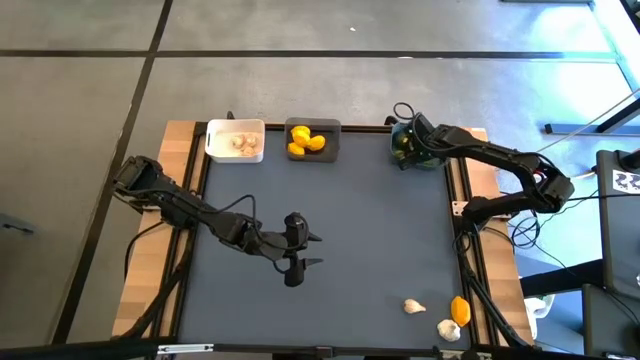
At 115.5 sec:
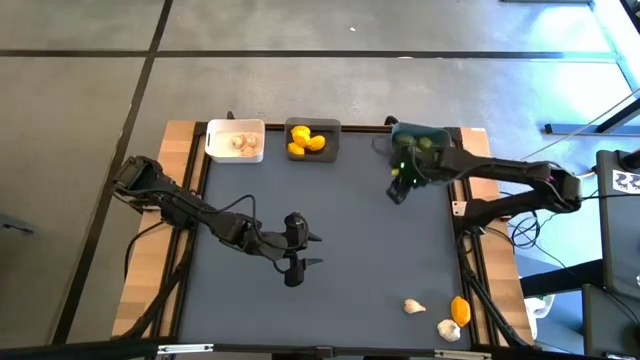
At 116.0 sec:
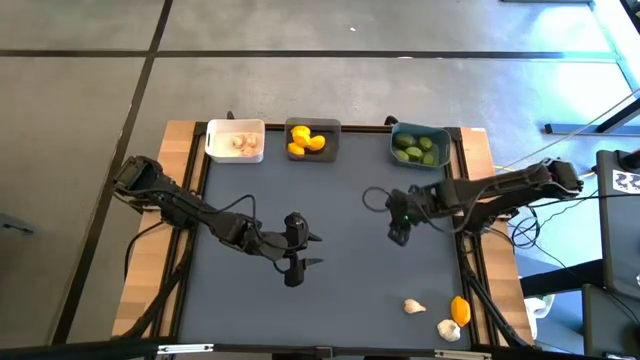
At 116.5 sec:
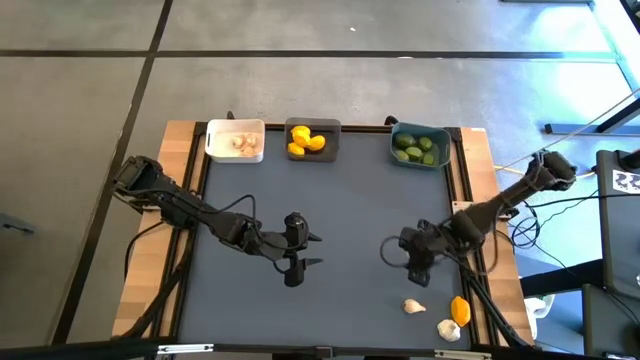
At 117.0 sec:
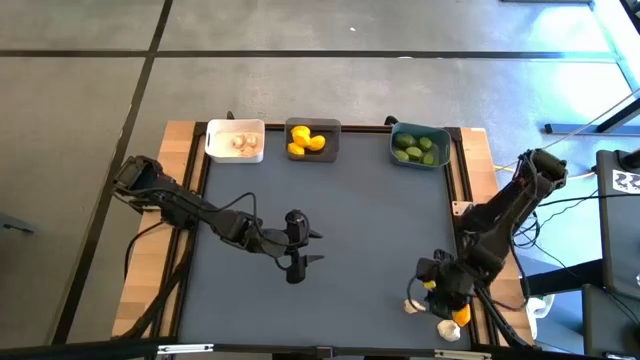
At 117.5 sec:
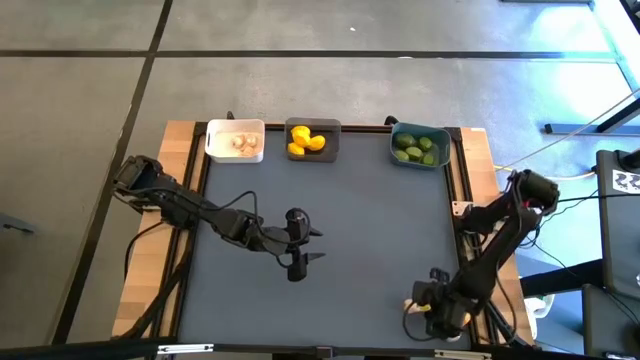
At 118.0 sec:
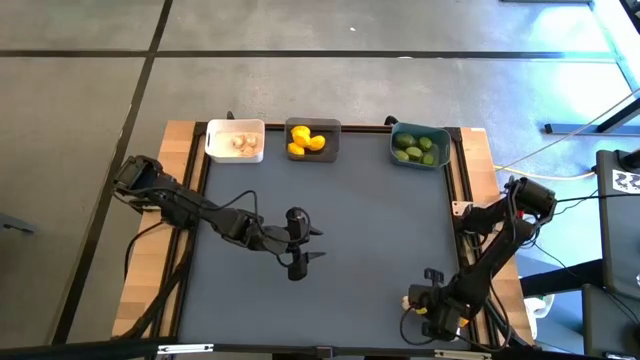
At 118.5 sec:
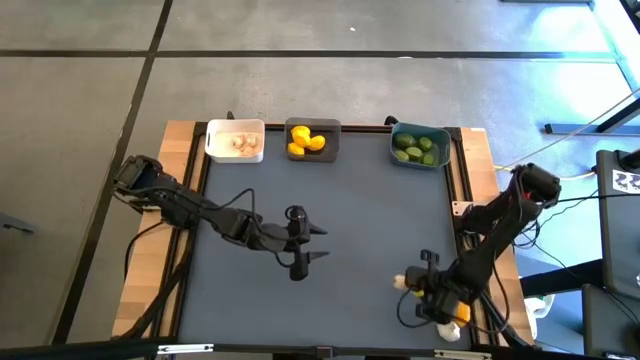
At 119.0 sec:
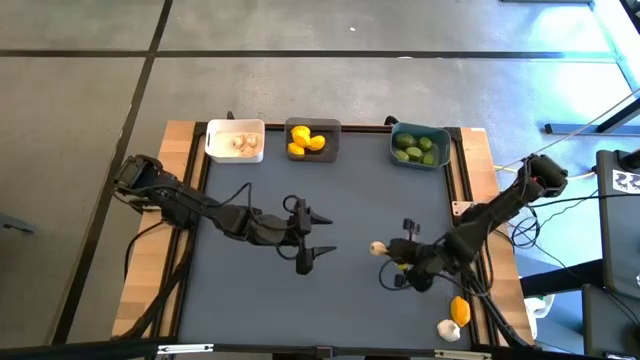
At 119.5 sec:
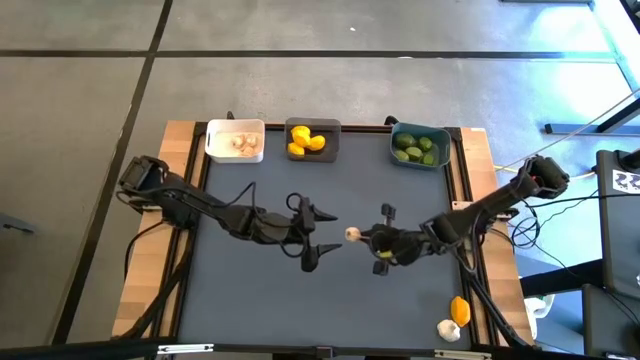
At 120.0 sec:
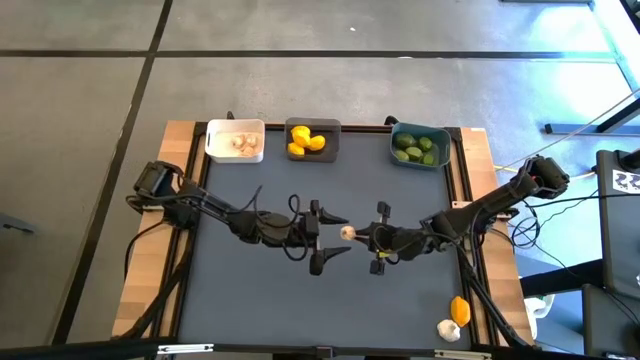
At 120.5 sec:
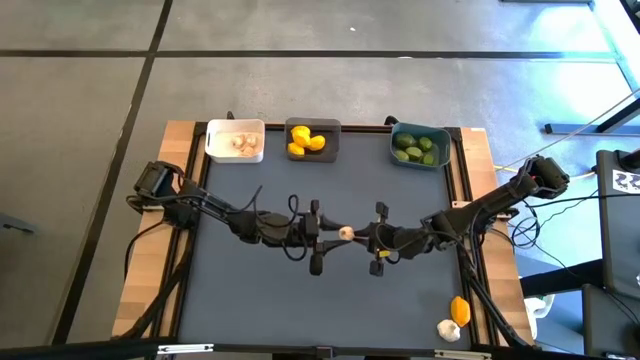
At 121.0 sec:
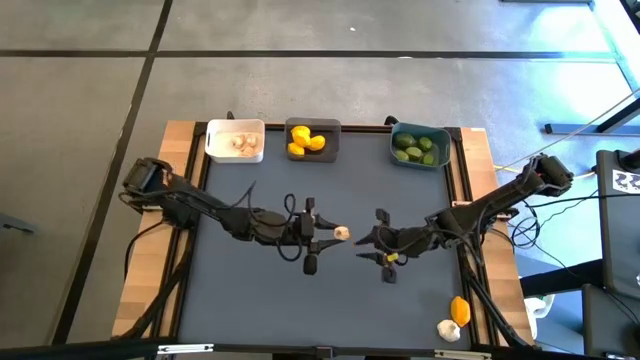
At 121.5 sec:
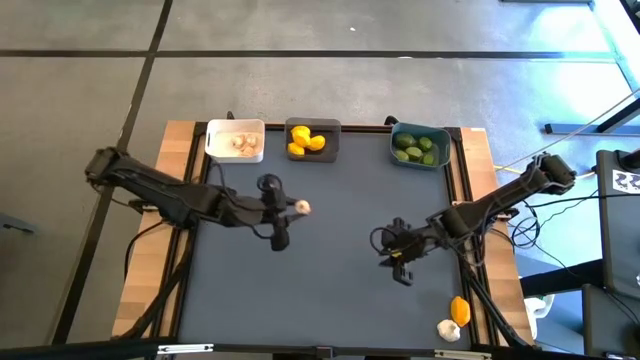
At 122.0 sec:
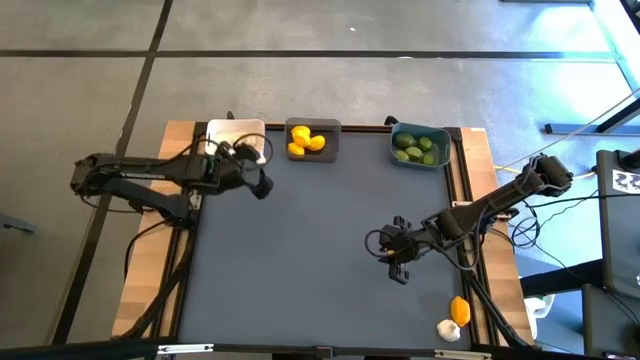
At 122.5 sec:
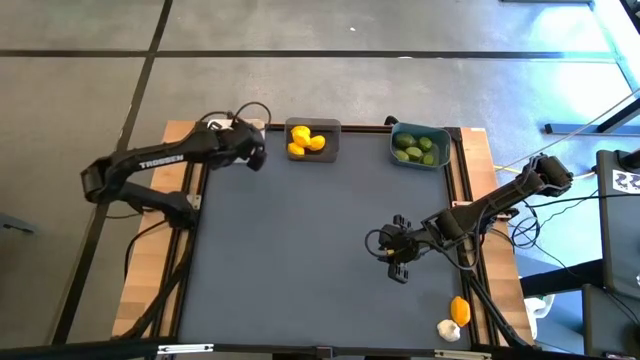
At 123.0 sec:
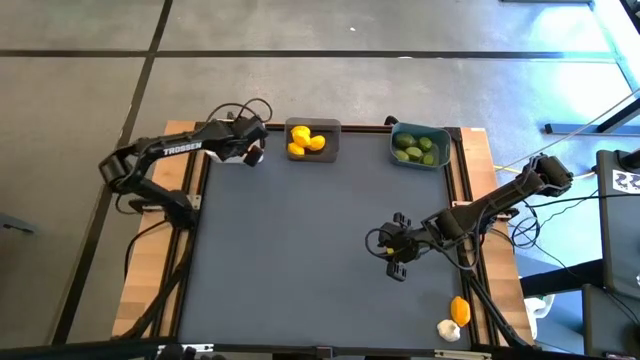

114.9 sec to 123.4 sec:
Task: Sort produce into baskets
Put the garlic into the white bin

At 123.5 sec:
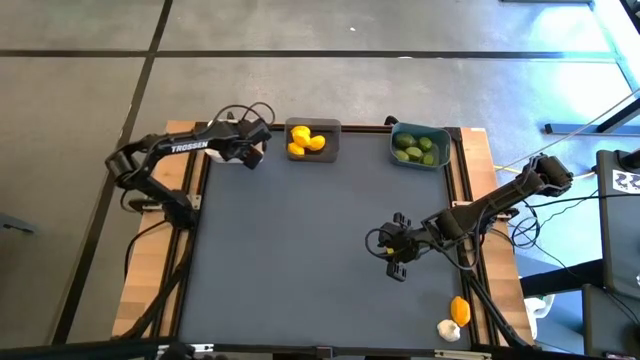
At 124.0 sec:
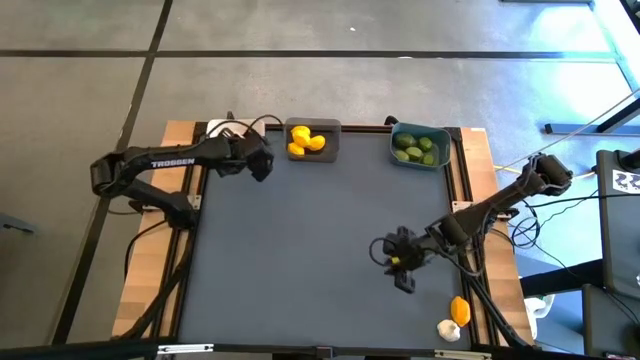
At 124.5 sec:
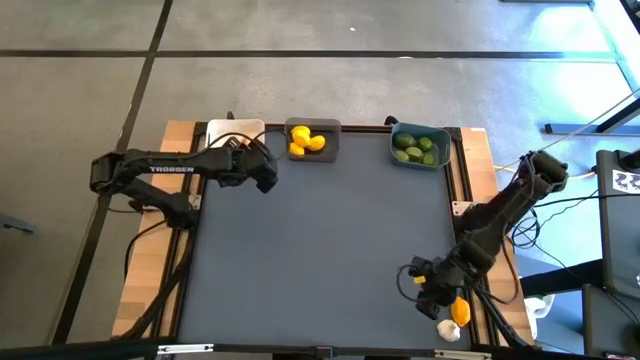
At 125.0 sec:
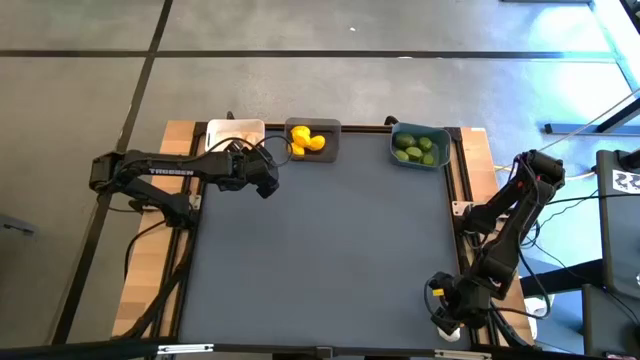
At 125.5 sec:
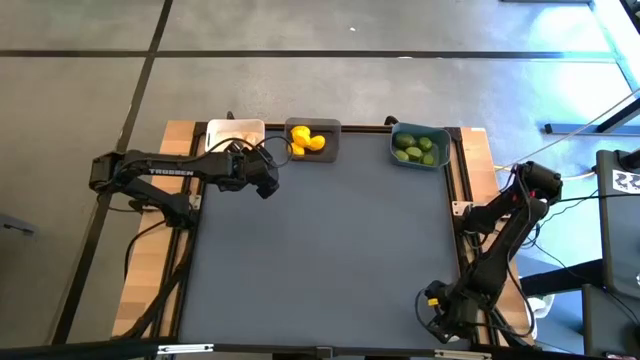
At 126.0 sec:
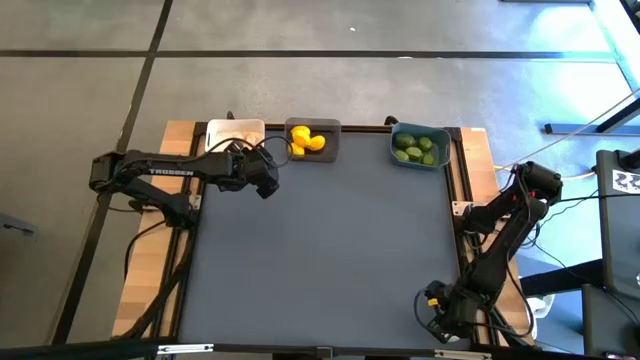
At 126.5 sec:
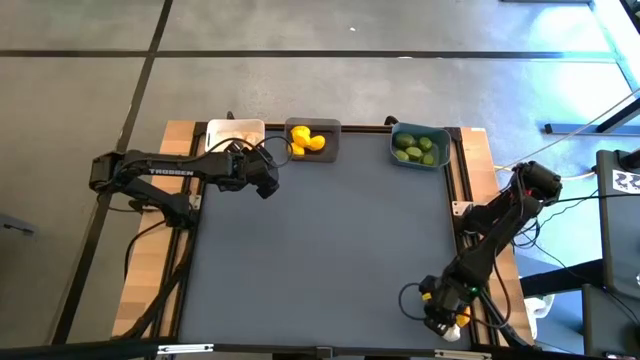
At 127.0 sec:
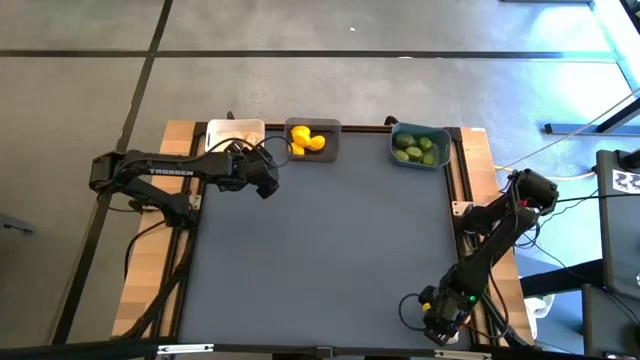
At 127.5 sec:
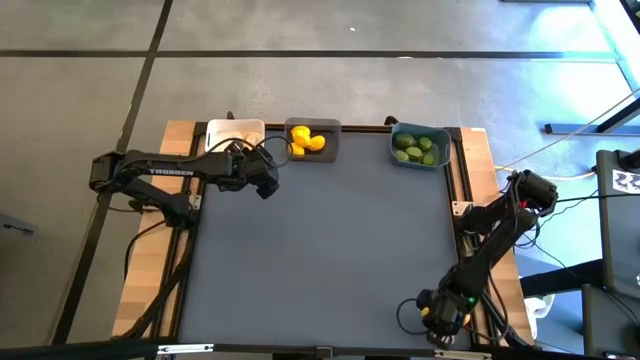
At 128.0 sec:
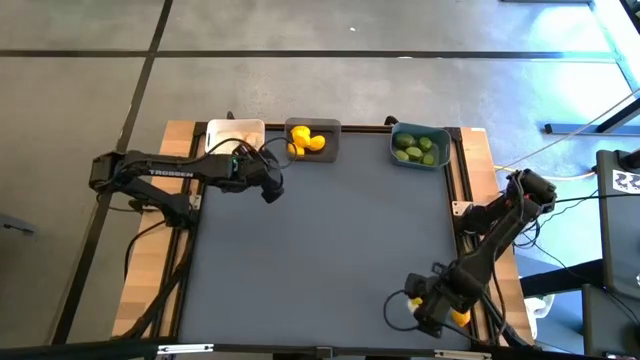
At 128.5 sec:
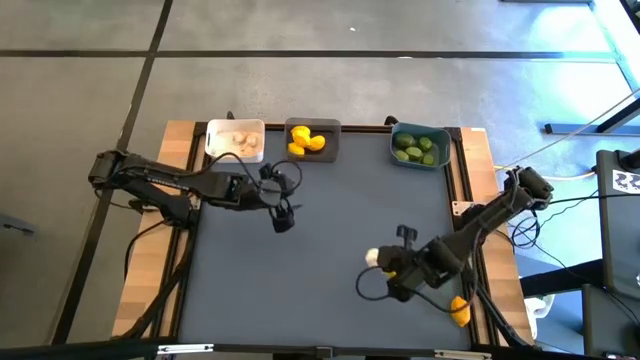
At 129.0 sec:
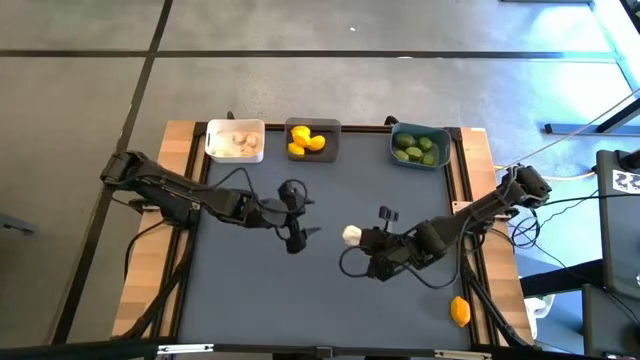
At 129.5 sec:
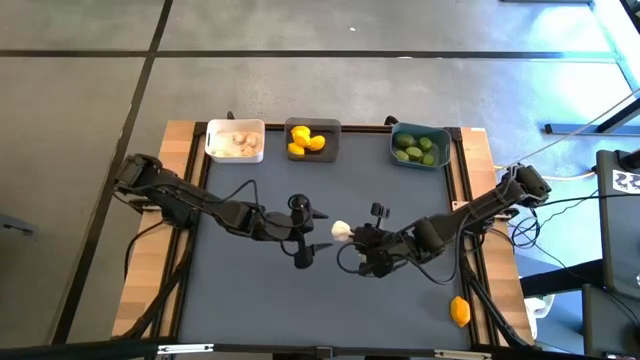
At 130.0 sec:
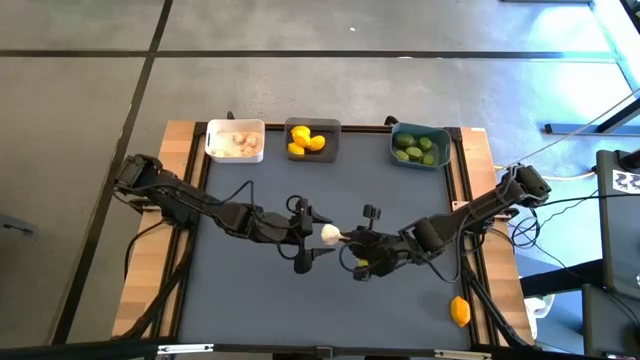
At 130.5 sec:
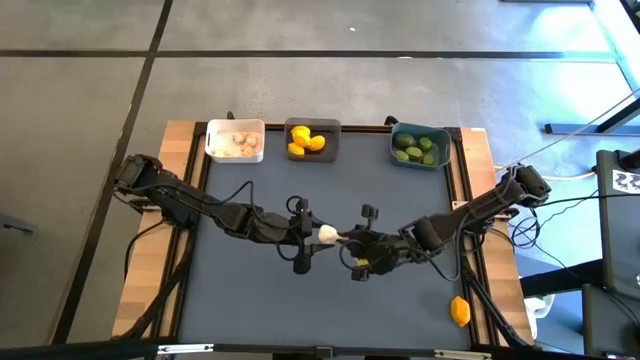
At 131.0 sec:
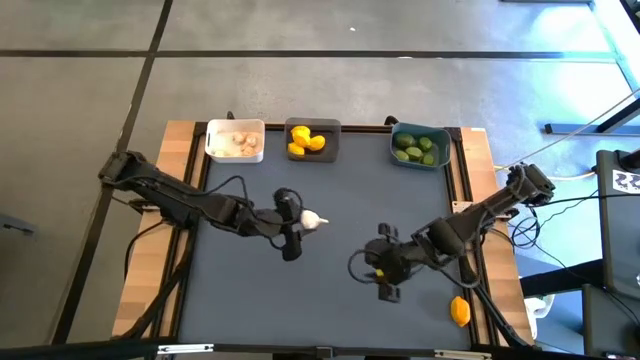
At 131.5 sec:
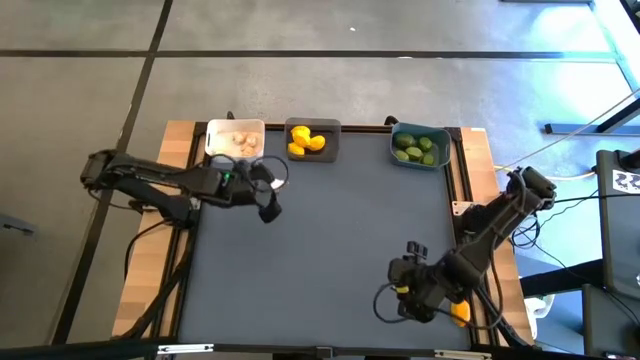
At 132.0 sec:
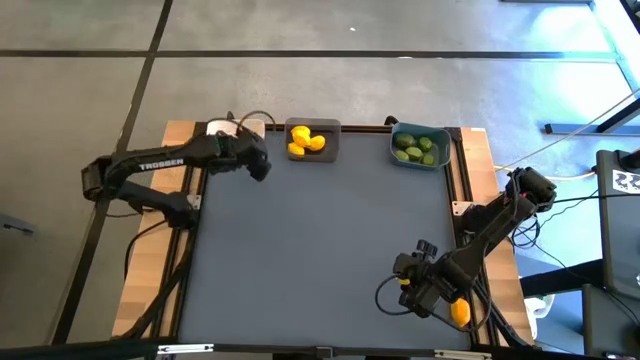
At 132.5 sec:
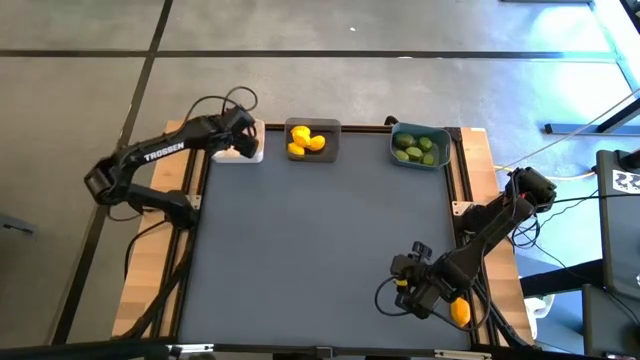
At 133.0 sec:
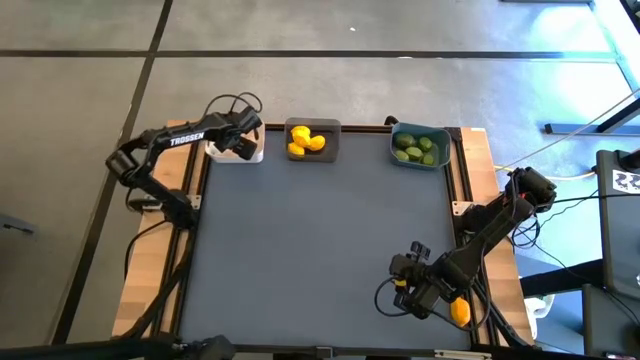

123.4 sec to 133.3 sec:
Put the garlic into the white bin

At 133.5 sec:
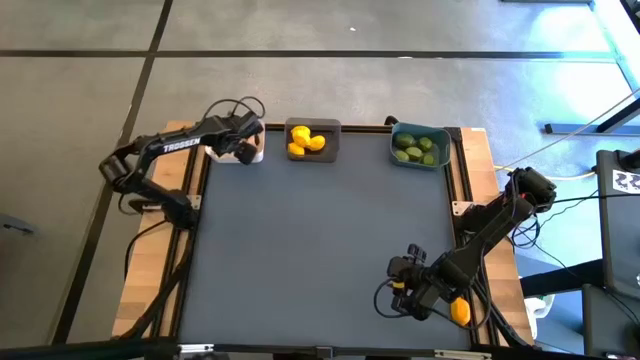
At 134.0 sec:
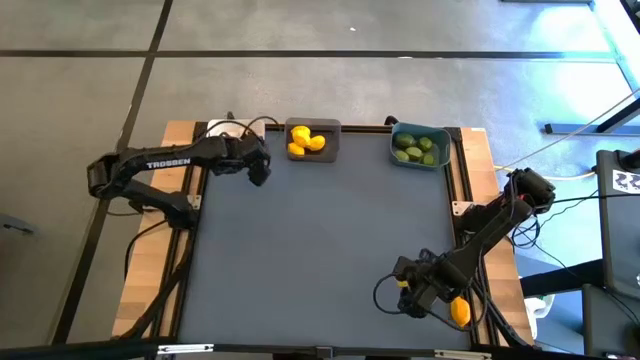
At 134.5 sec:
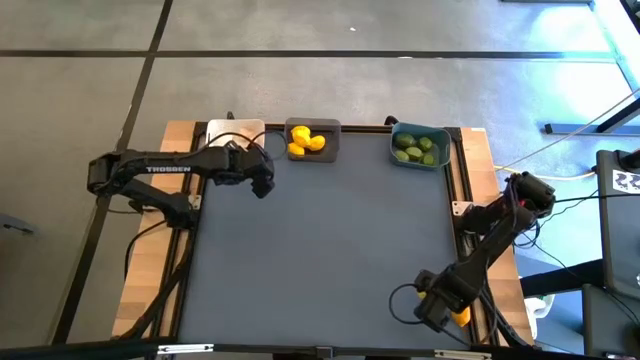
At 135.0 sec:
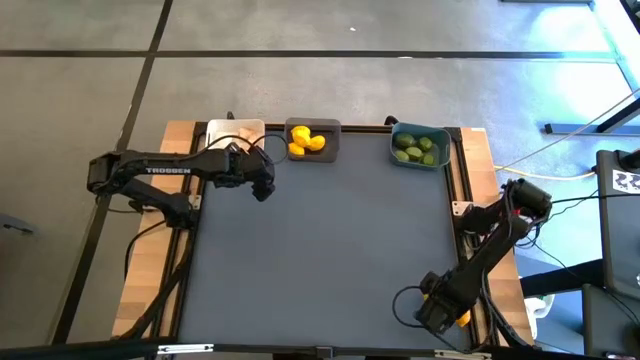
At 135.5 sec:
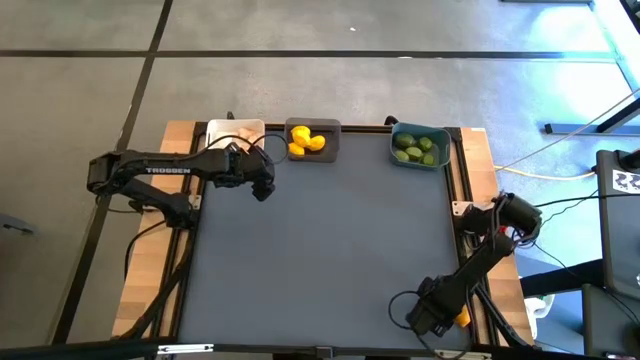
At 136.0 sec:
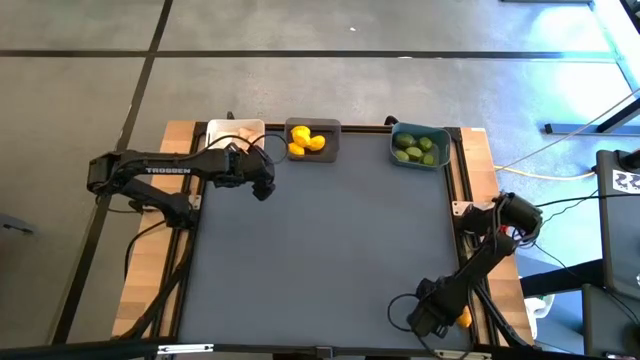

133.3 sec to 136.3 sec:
Put the lemon into the black transparent bin
